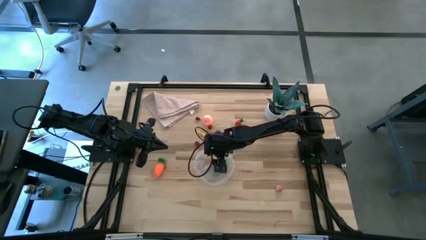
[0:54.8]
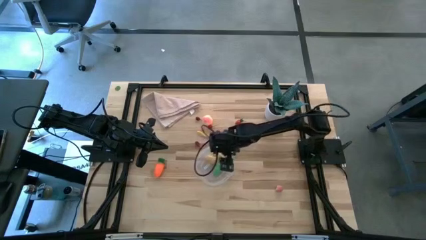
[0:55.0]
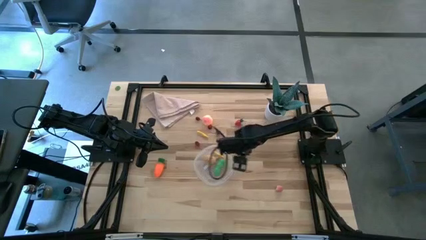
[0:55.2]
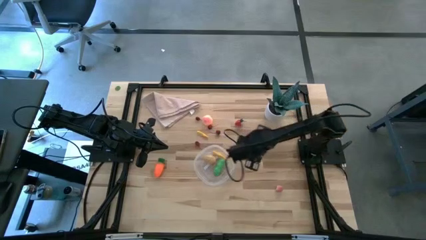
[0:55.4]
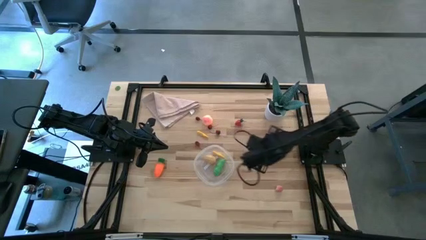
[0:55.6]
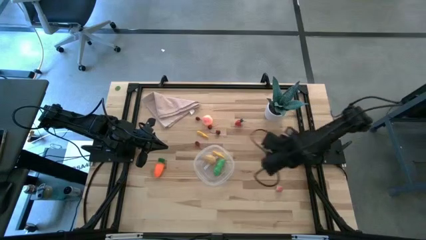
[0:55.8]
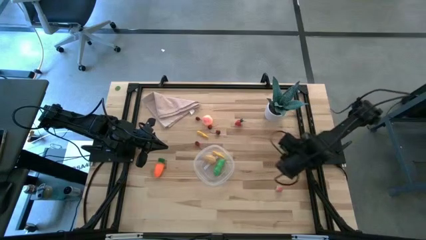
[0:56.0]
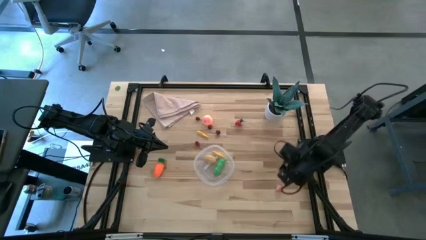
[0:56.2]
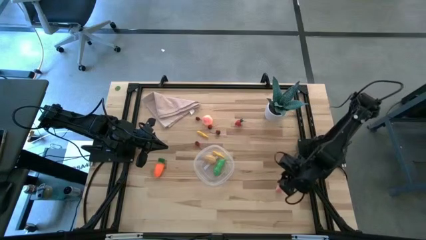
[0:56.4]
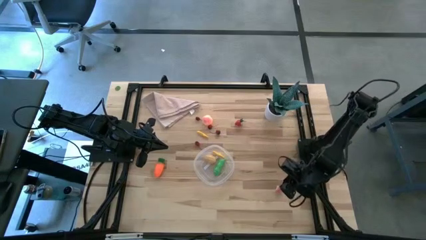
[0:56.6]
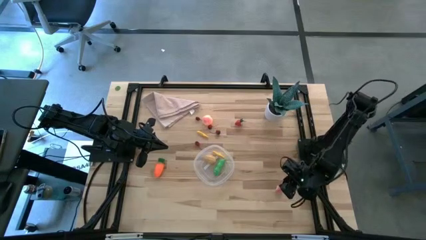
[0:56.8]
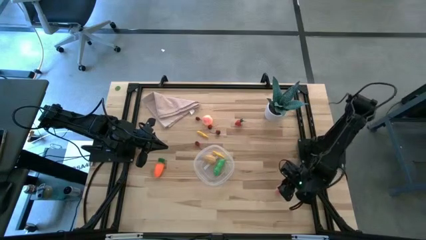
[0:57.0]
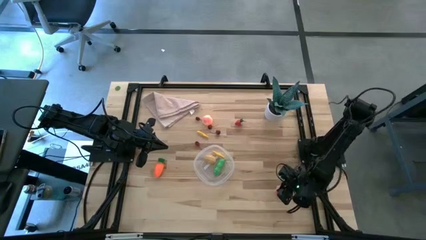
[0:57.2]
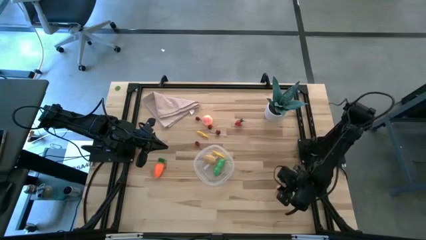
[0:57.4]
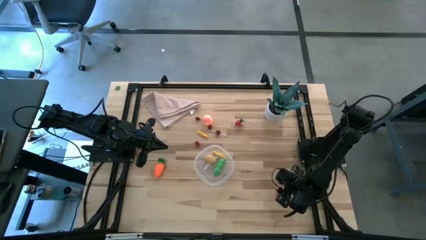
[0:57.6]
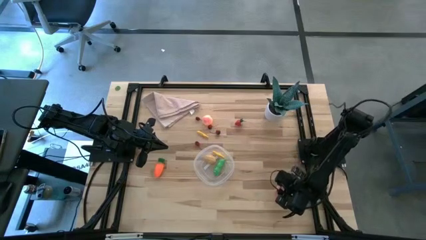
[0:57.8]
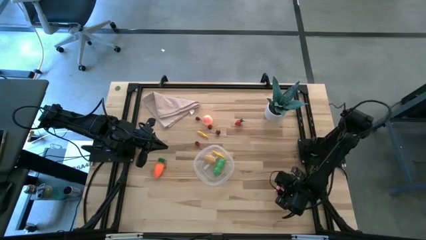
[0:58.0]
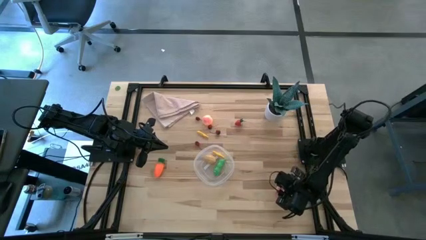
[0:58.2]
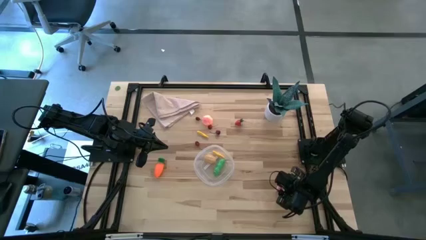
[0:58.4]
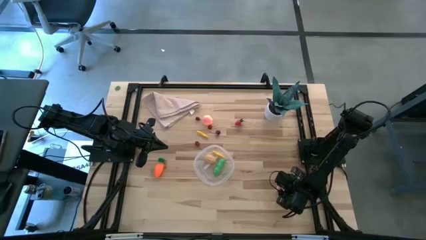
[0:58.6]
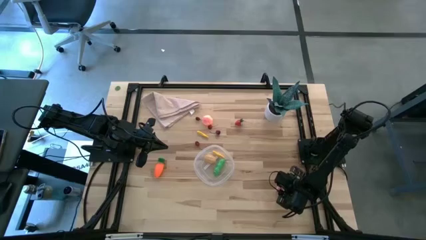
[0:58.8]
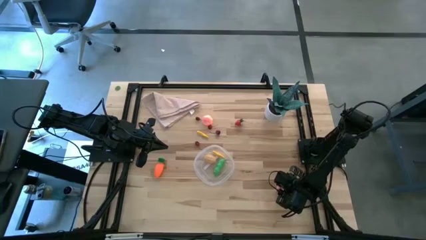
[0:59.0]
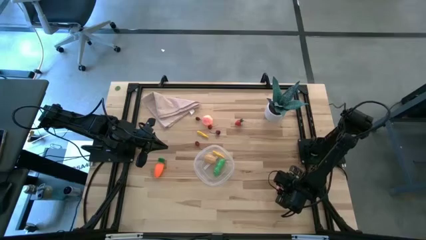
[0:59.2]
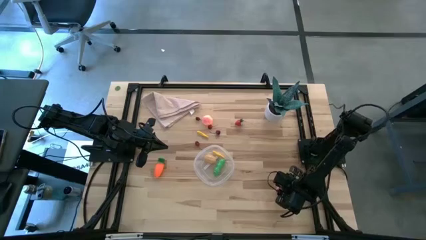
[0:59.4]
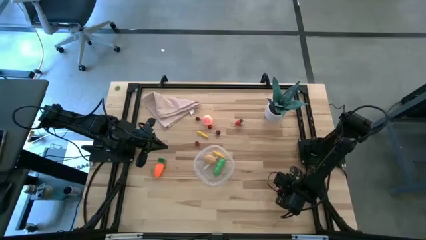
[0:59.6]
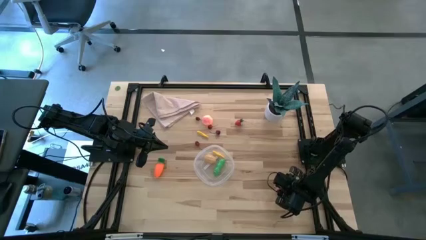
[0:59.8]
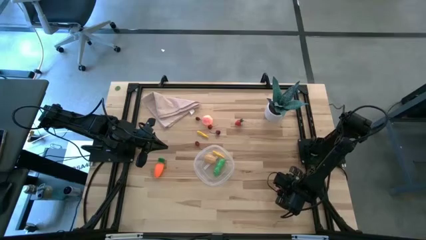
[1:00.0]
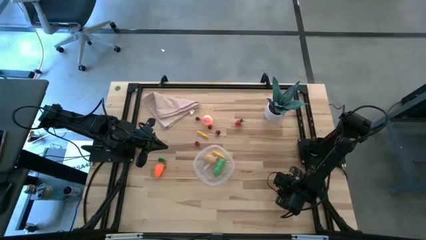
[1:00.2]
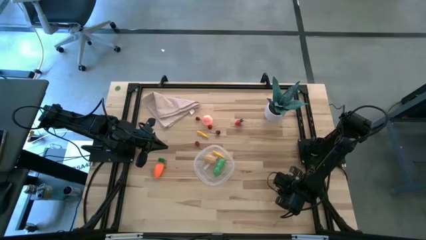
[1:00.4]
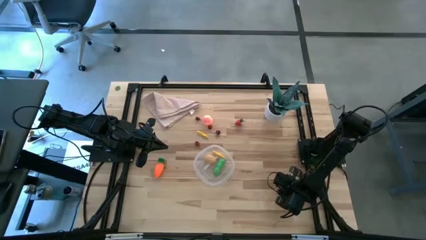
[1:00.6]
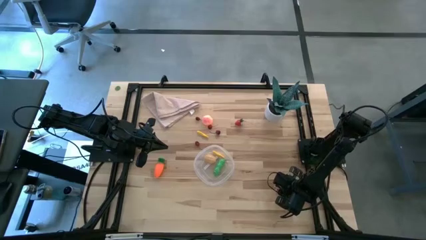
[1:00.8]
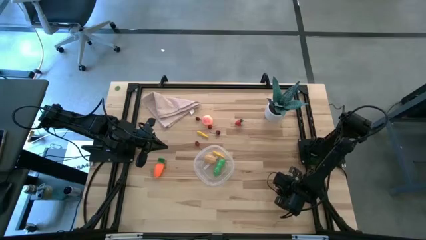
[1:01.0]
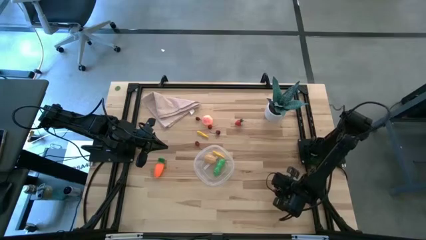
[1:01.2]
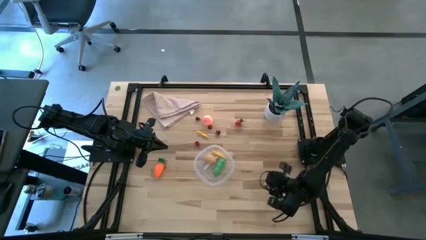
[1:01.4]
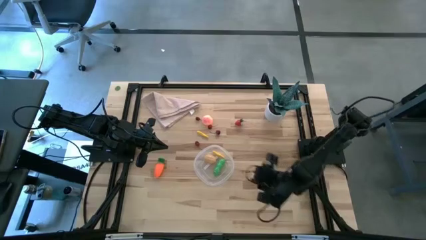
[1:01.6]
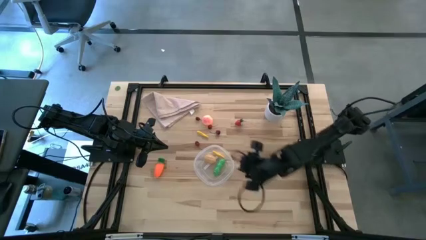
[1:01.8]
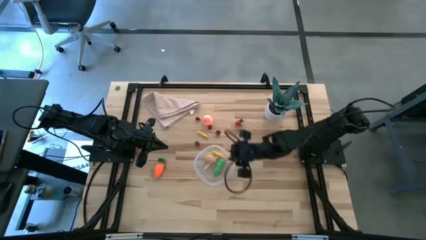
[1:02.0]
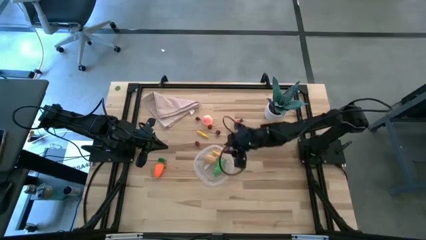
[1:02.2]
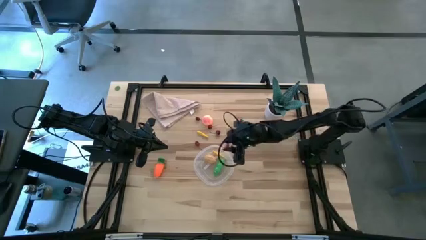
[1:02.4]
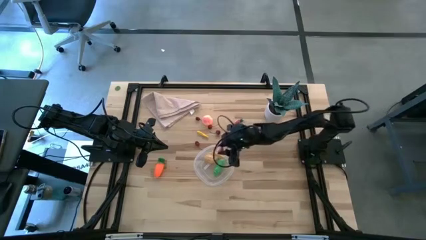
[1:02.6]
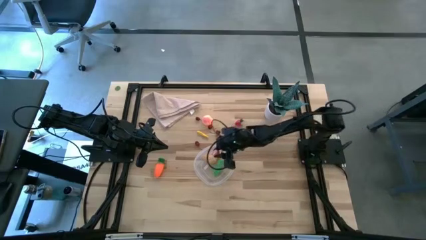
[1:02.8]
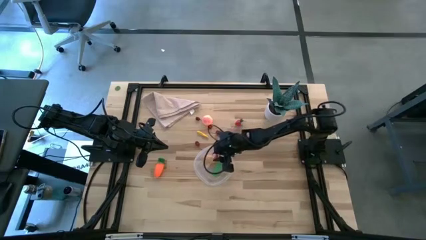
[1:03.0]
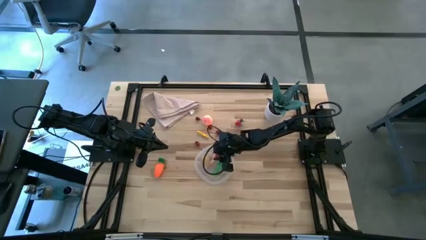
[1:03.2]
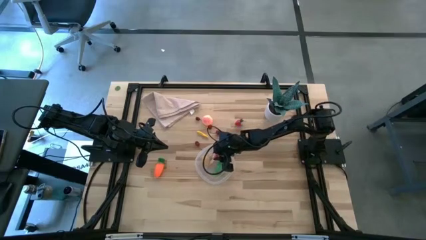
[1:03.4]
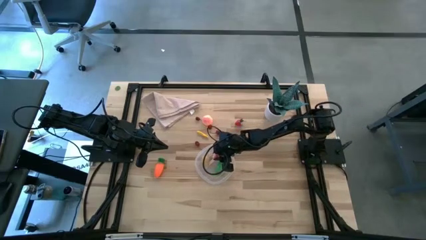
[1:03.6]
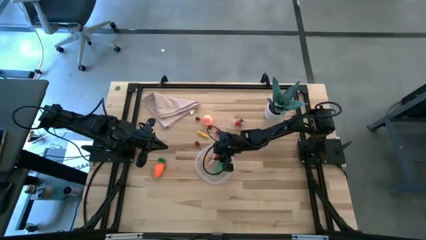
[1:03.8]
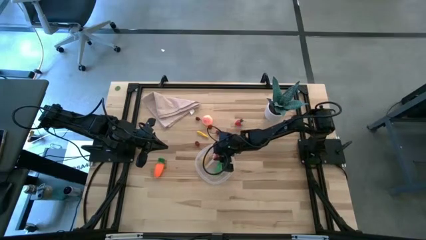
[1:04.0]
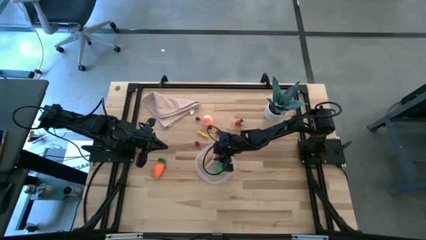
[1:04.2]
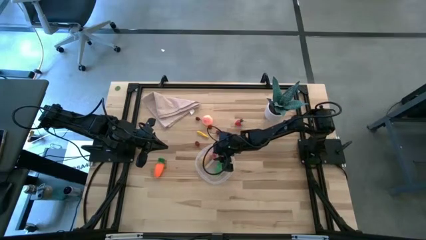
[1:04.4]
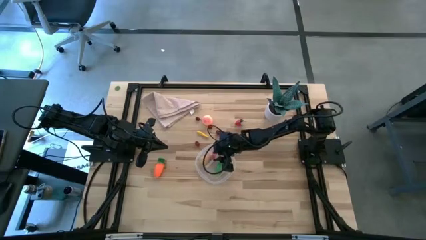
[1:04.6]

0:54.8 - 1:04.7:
Task: Pick and placing Produce into tupperware
Put the small peach into the transparent bin

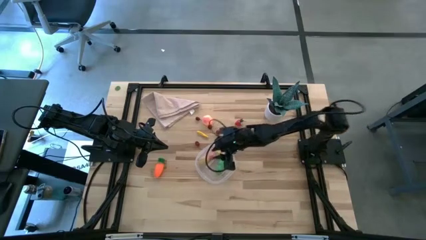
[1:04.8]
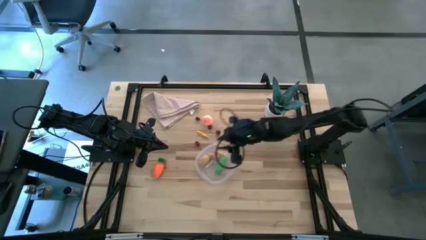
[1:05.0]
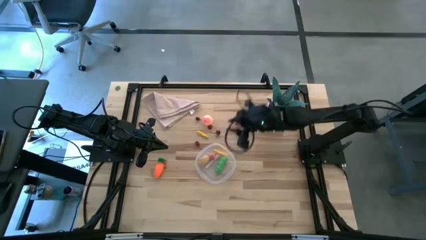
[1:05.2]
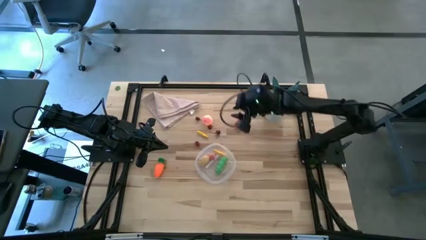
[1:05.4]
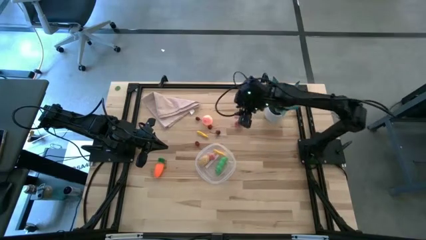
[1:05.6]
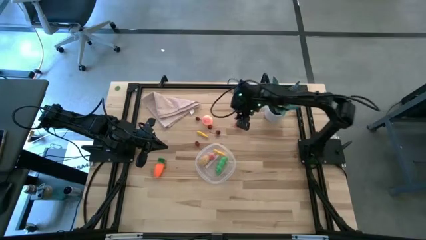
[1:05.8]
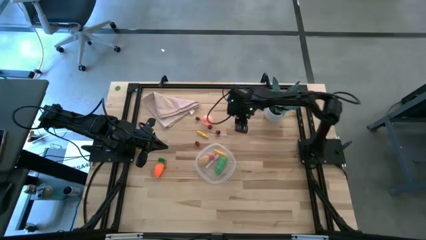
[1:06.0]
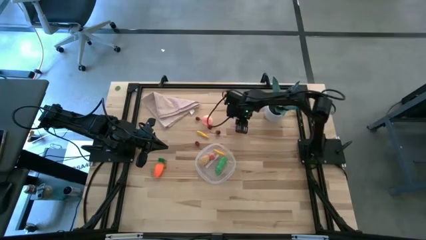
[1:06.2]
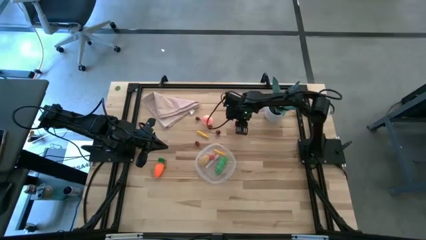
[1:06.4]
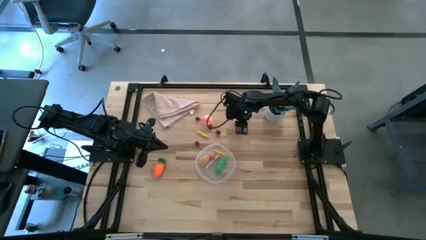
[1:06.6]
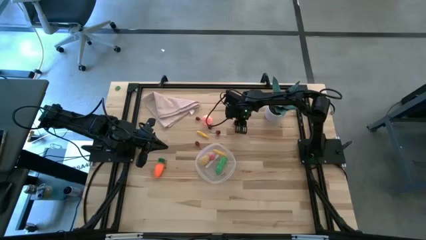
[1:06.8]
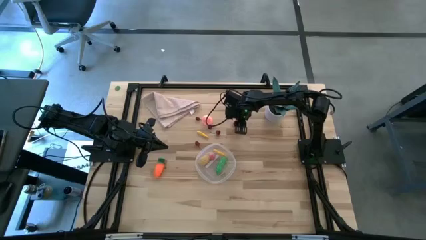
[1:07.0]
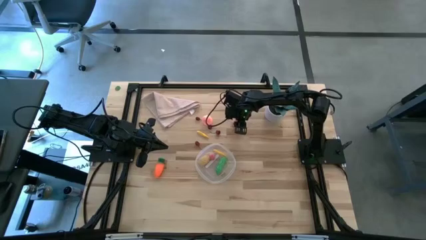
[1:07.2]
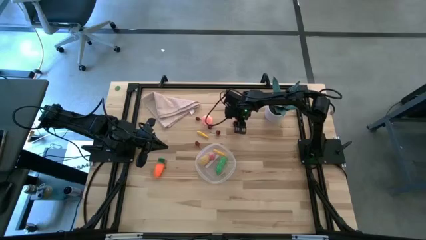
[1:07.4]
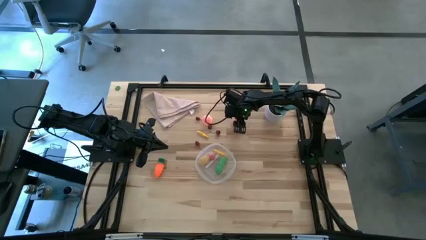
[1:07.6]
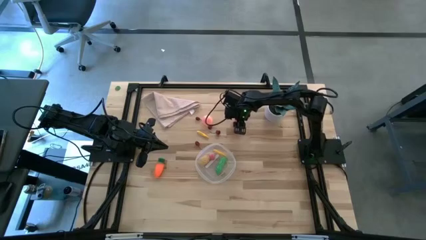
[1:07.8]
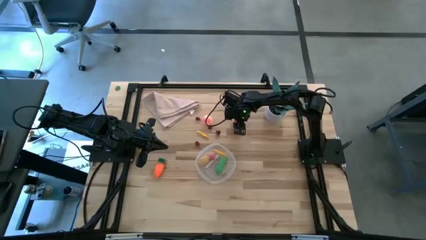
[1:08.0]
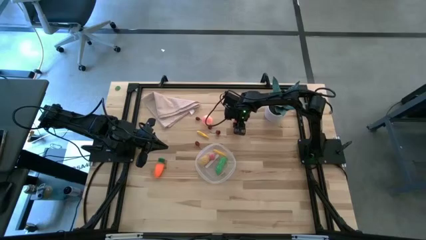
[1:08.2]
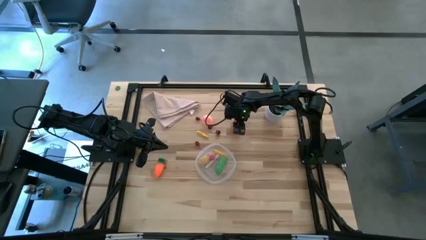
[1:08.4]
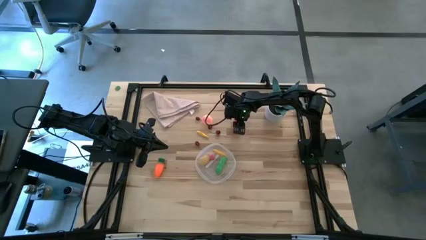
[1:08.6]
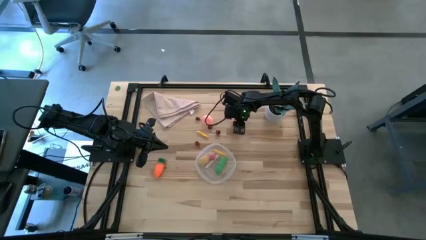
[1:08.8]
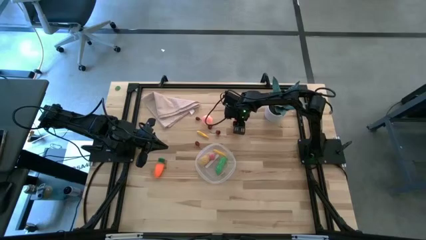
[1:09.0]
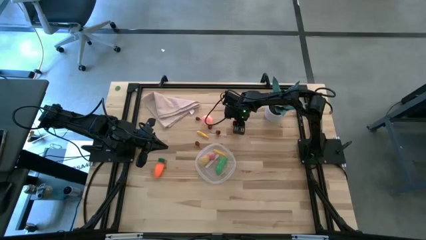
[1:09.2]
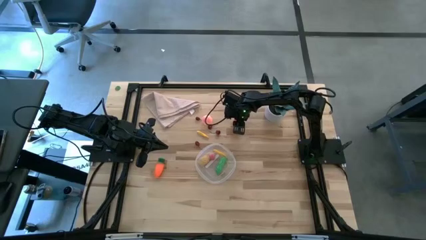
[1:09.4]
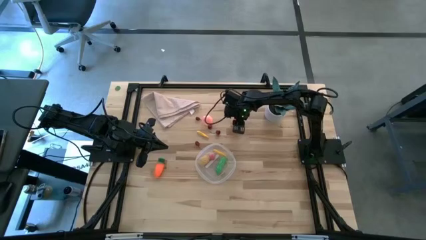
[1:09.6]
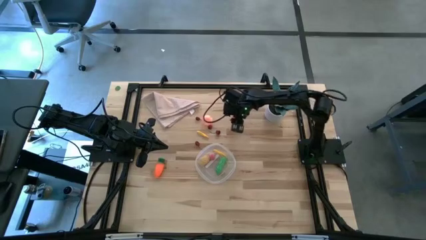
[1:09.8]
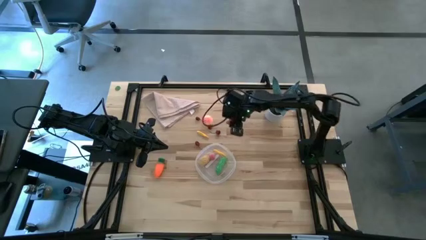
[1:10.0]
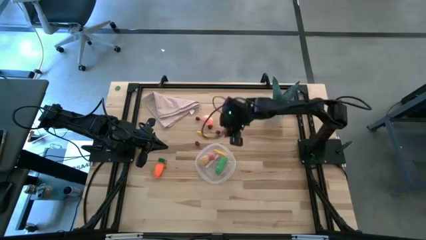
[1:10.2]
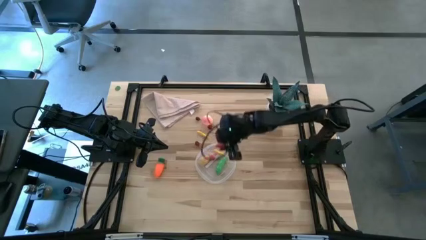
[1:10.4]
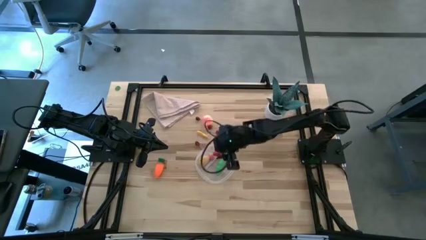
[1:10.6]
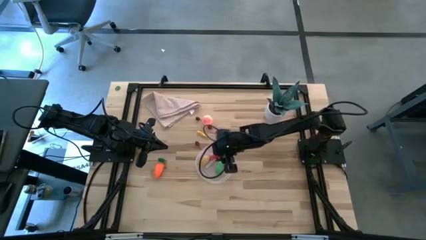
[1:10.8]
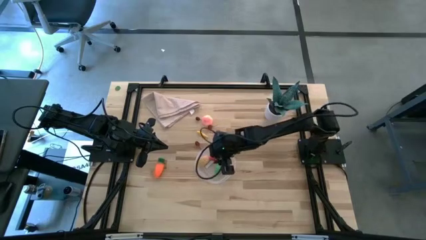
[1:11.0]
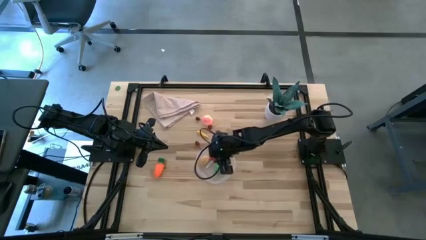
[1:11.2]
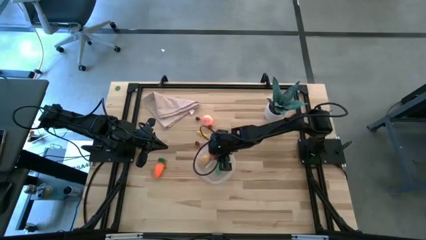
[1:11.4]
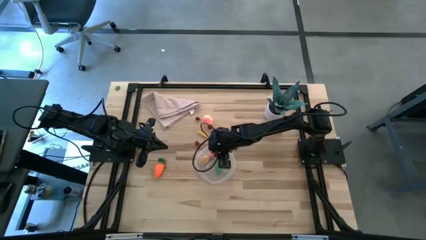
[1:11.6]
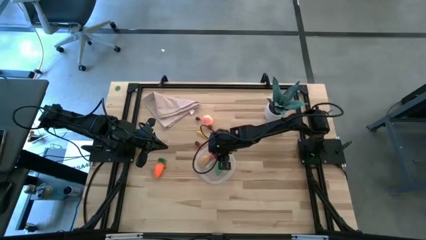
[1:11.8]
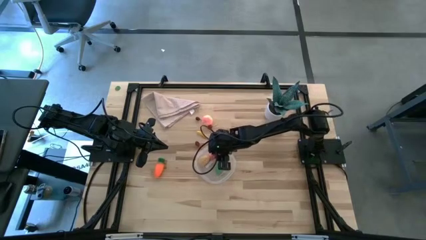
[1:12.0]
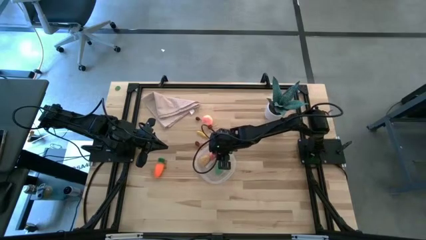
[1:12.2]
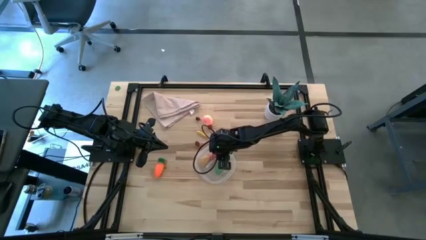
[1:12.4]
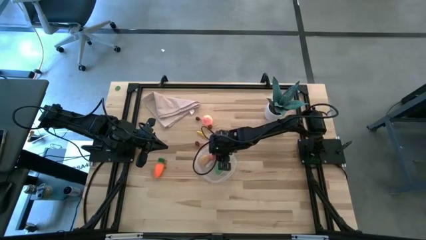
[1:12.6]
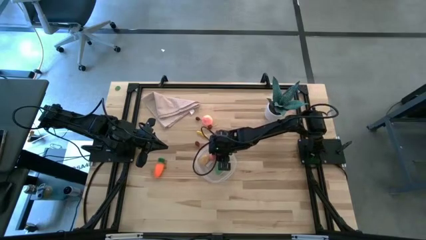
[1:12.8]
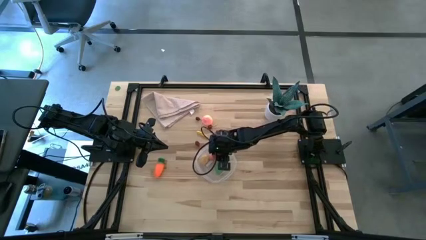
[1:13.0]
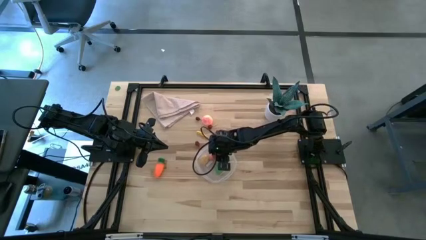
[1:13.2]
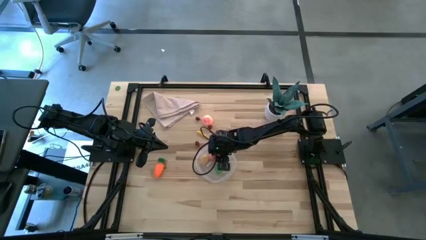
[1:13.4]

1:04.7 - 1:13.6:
Put the strawberry into the transparent bin
